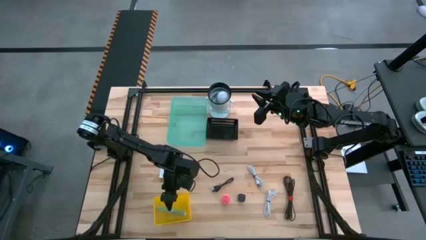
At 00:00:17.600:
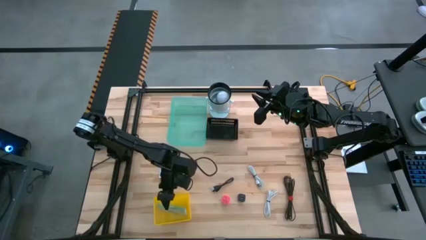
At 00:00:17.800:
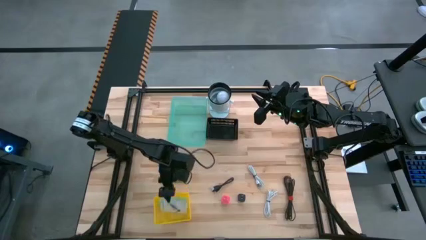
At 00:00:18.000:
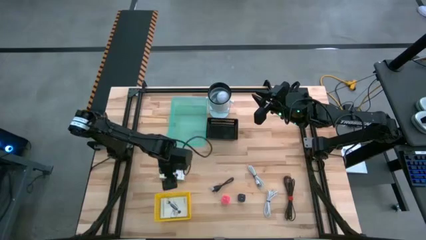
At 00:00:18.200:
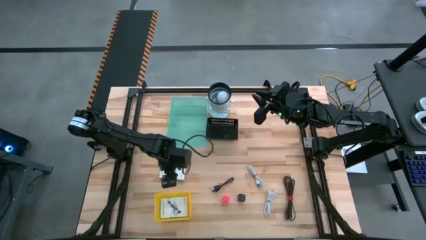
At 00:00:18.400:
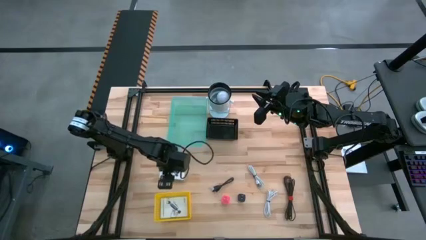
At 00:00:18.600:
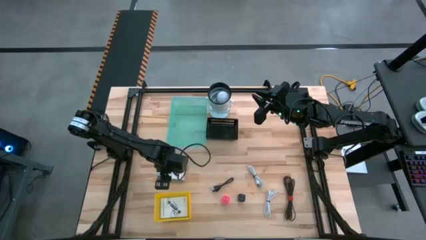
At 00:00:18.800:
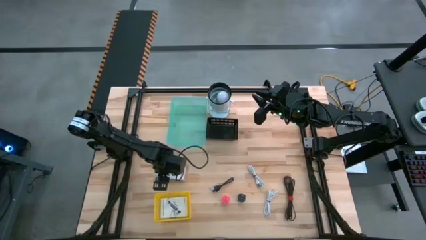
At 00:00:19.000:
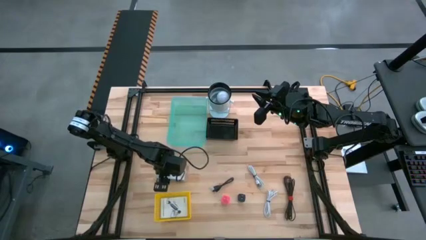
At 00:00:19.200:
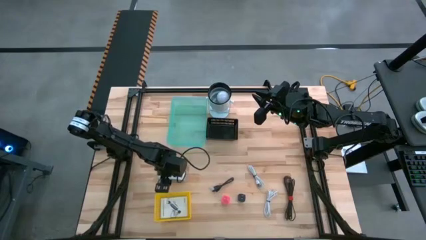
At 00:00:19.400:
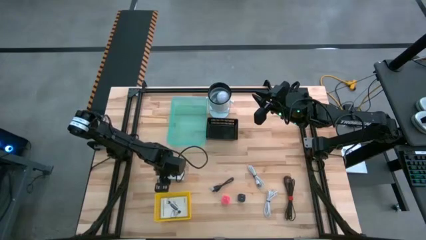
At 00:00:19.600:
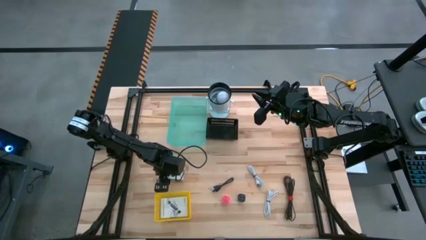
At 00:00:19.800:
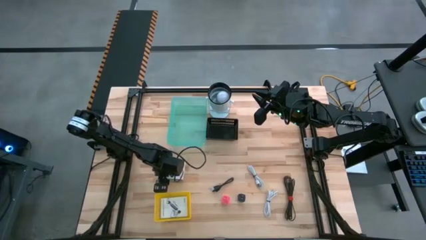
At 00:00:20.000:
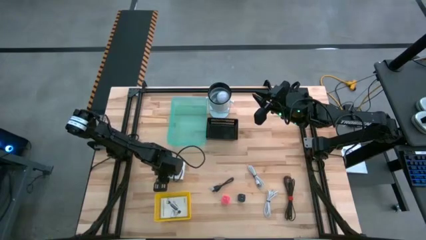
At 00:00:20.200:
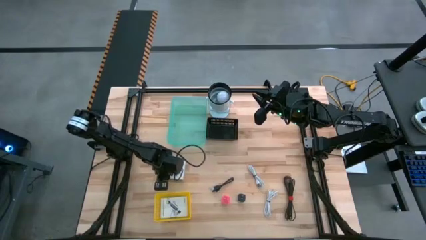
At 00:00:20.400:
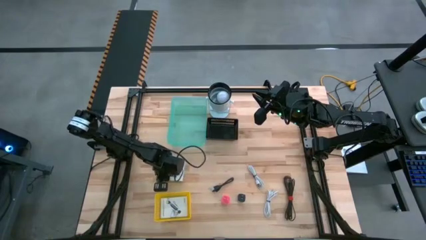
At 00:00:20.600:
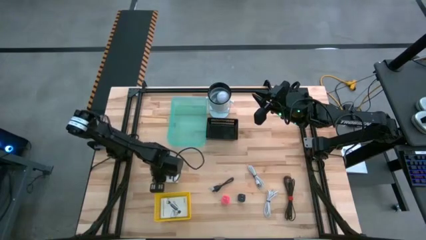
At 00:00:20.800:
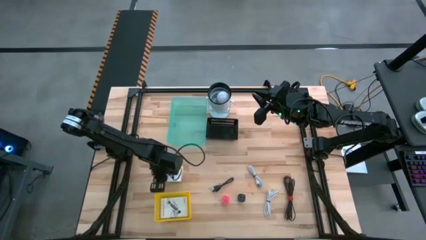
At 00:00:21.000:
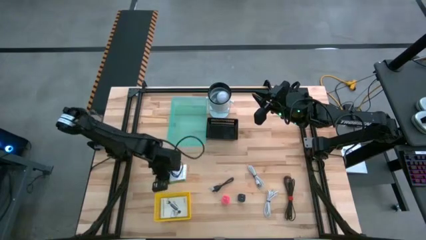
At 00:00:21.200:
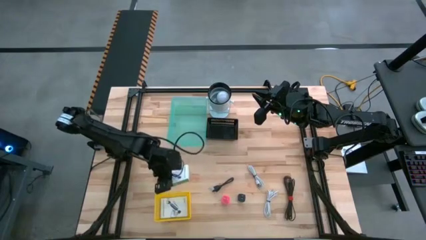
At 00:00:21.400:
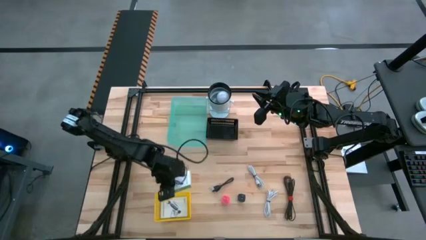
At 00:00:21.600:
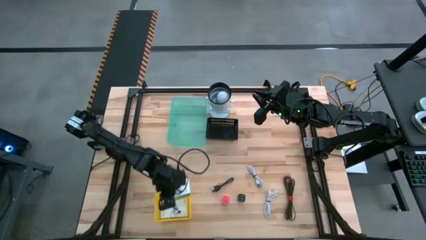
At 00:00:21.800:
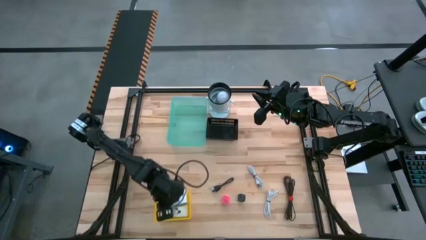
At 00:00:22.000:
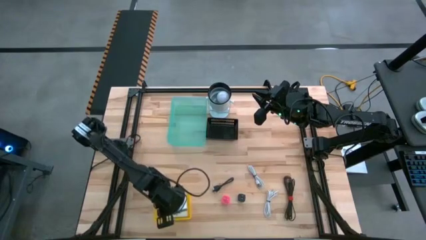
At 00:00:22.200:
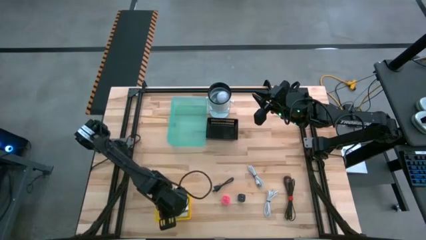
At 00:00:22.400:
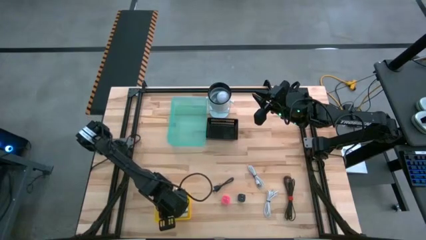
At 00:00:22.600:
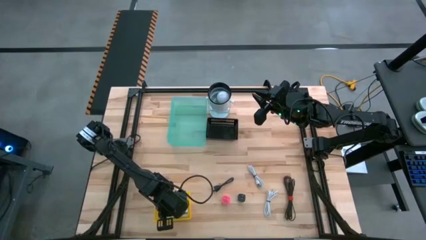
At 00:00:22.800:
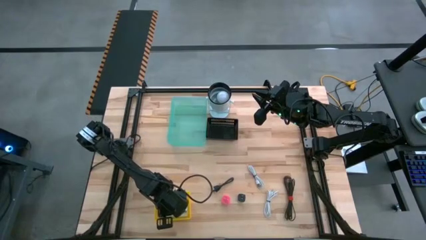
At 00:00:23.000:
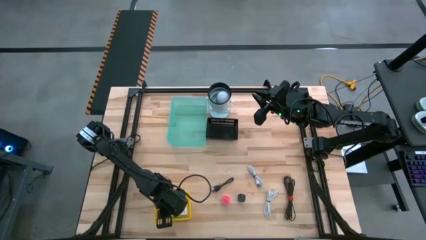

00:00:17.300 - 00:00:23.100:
Task: Pick and place items into bin
Put the white card reader box into the yellow bin

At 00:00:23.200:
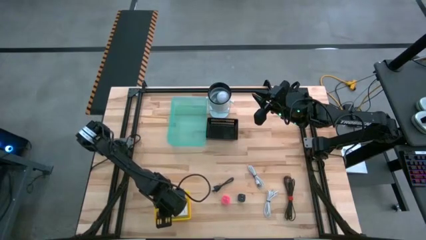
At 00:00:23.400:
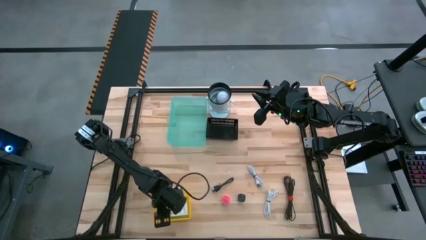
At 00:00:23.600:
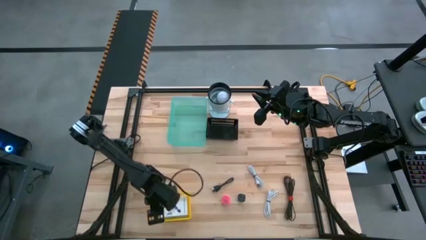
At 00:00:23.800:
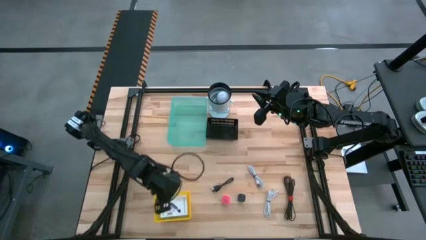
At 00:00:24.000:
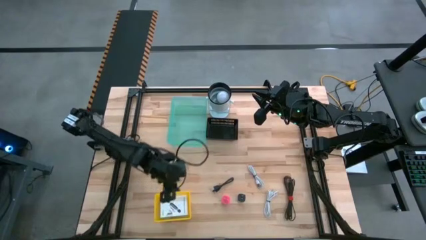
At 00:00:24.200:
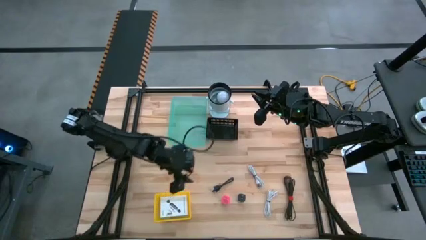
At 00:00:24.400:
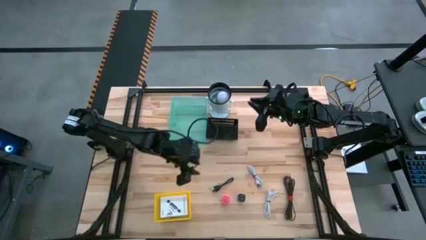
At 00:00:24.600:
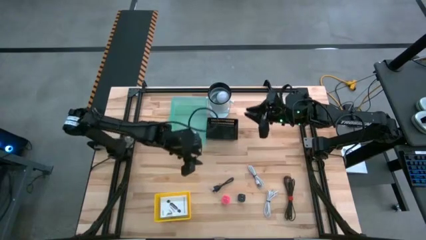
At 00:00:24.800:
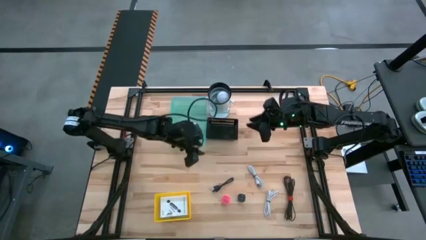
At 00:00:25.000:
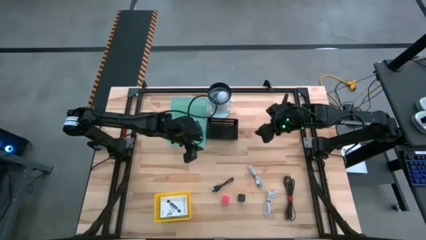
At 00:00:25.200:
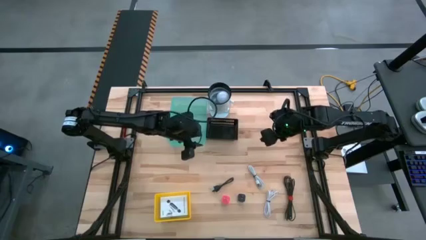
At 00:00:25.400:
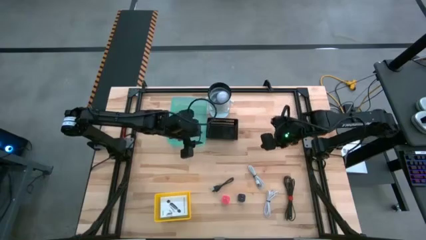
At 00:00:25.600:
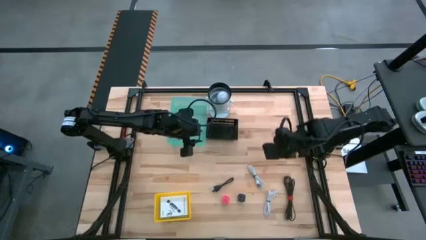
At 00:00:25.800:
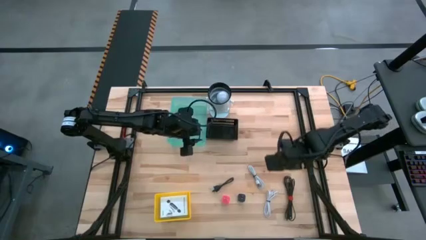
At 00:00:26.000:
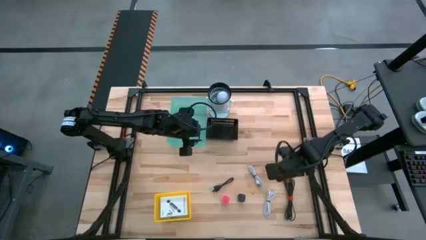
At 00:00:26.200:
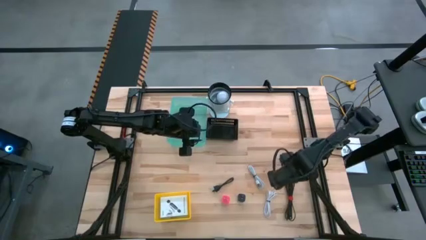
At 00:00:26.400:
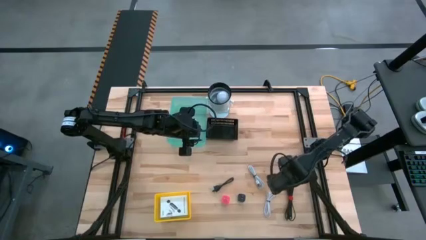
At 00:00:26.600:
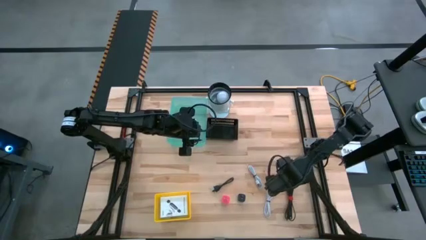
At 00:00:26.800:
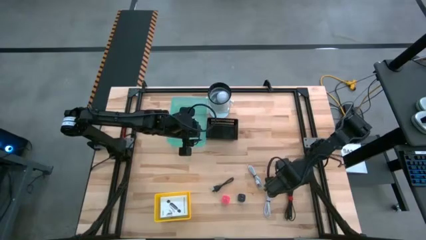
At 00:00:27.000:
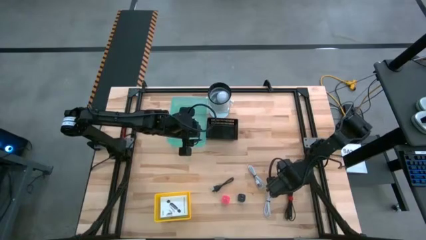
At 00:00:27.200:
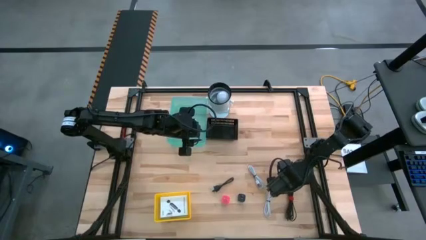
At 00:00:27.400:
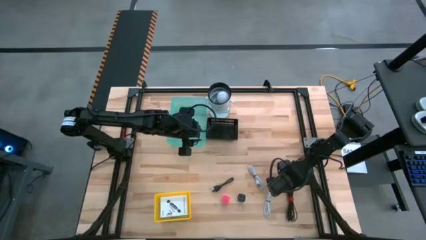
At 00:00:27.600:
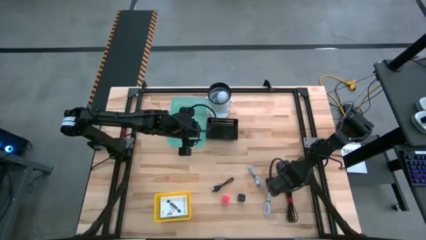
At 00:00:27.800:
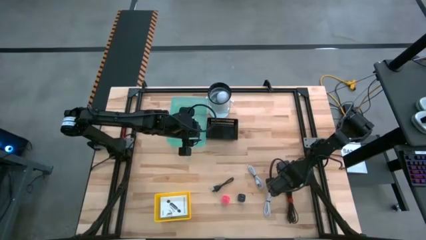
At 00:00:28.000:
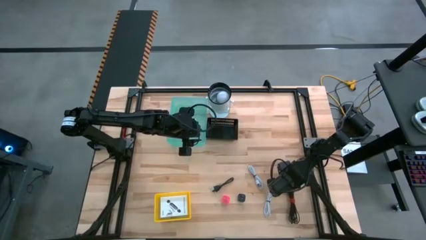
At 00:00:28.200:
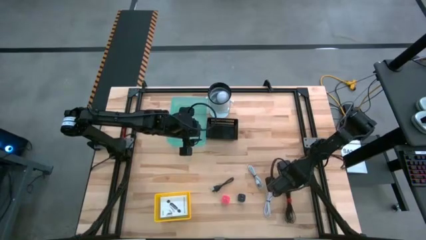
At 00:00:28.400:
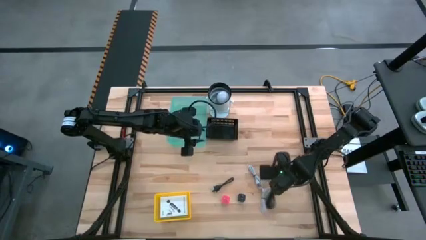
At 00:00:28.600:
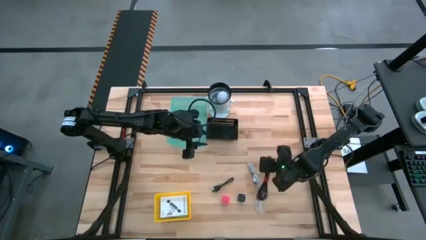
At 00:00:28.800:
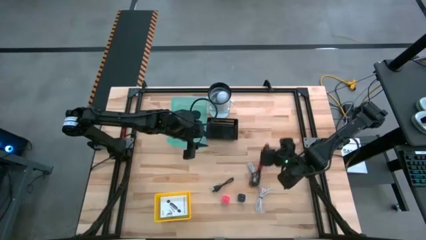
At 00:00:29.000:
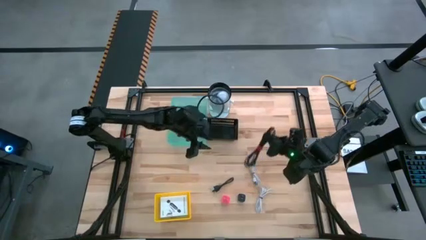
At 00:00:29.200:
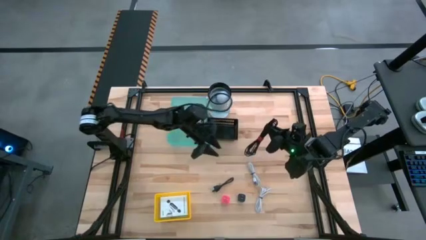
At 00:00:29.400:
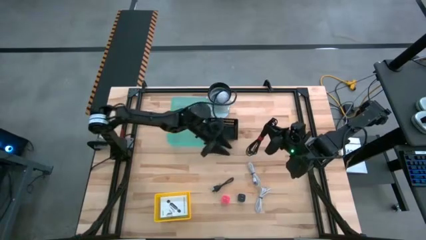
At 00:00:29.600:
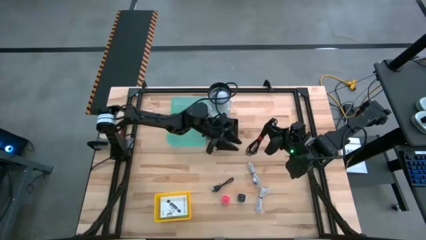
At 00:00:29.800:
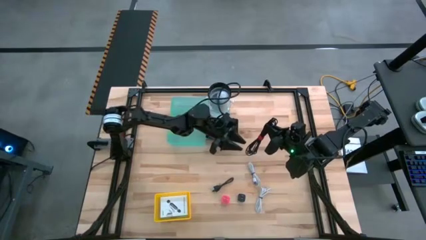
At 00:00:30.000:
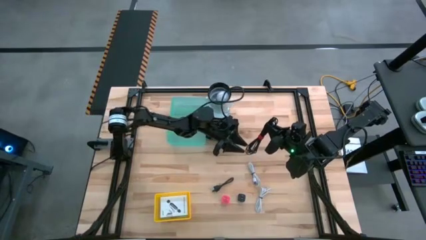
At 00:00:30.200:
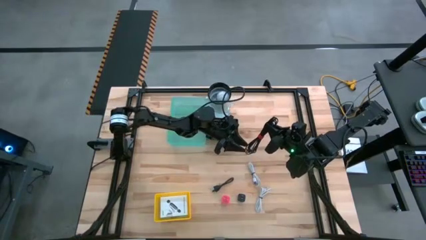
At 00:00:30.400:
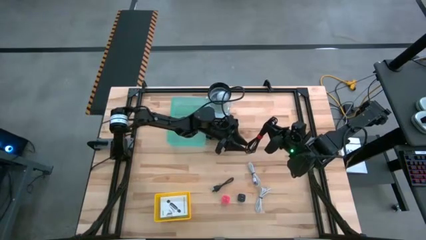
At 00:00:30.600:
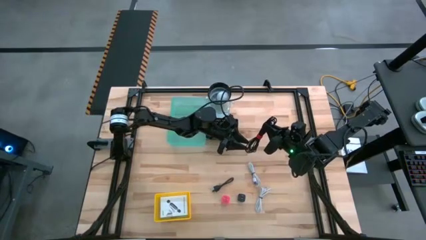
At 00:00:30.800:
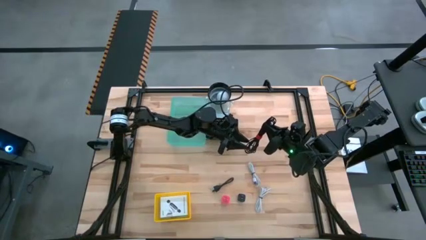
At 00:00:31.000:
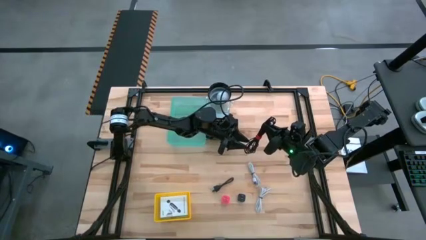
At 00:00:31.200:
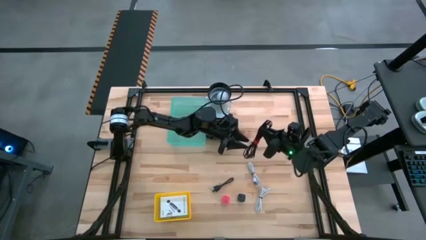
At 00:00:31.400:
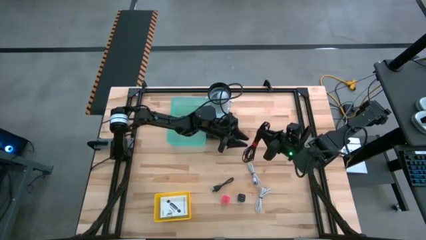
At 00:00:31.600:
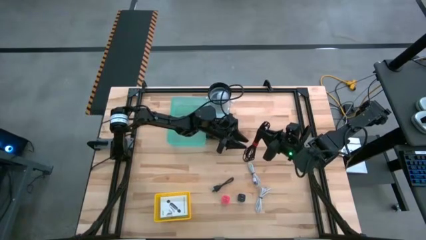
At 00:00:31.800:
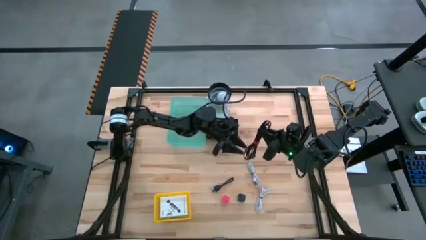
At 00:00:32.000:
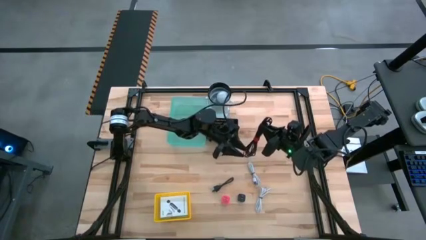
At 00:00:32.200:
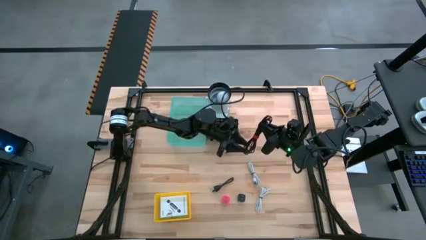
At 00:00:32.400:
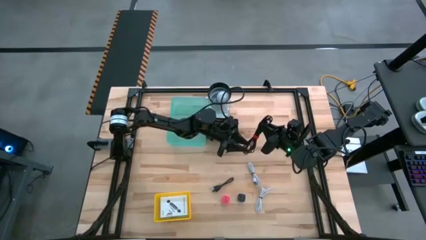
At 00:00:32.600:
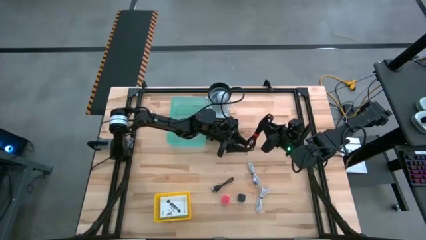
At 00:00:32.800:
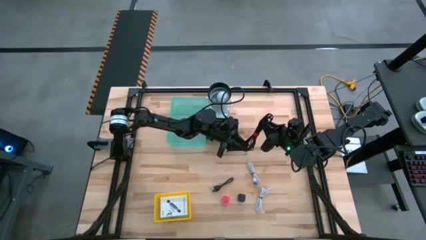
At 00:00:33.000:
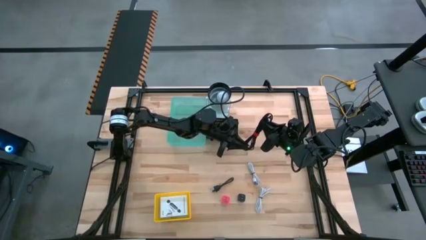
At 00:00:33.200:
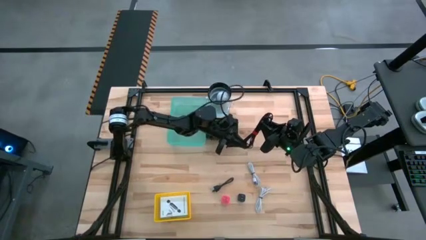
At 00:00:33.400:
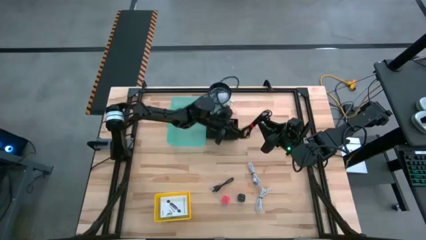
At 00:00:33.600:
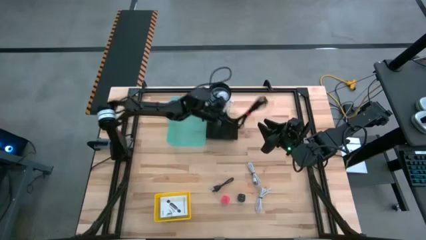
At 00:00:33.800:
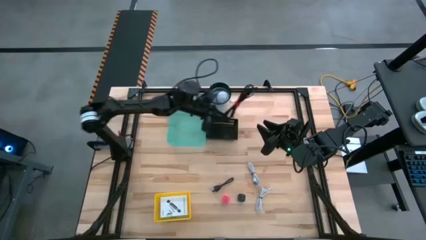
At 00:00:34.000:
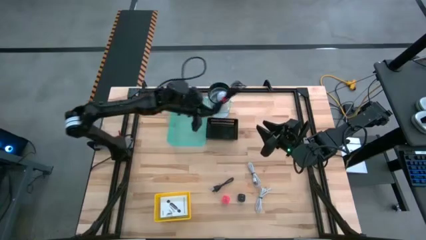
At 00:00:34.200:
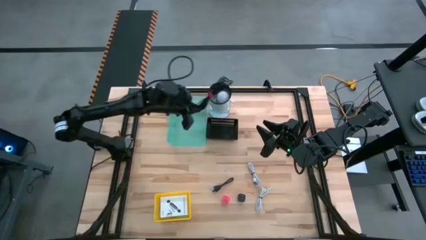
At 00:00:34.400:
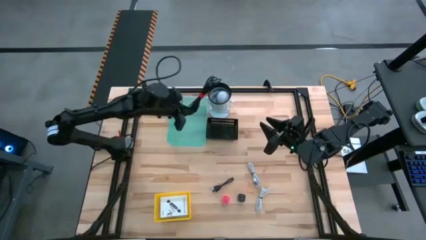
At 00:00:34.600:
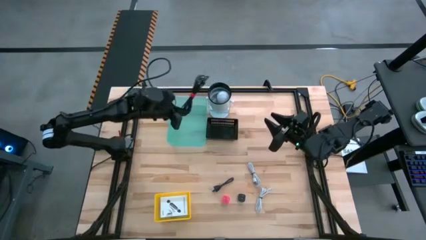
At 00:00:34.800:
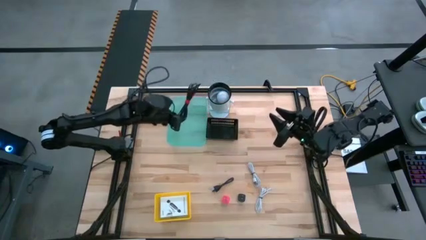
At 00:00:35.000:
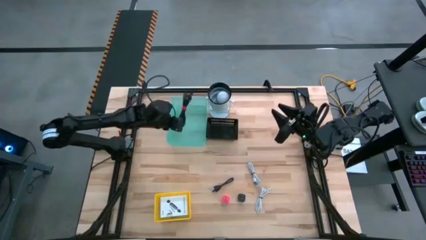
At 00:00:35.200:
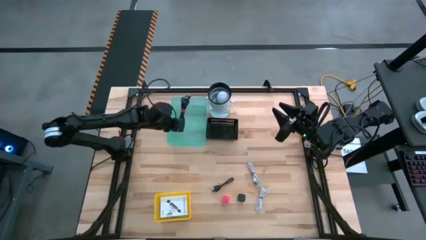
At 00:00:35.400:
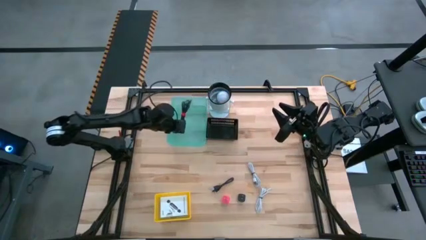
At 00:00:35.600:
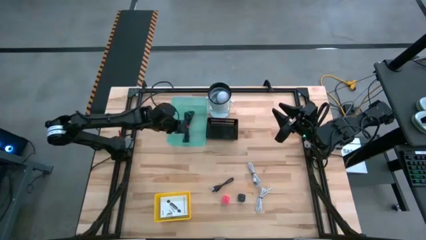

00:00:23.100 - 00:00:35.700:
Put the right black charger cable into the green bin
